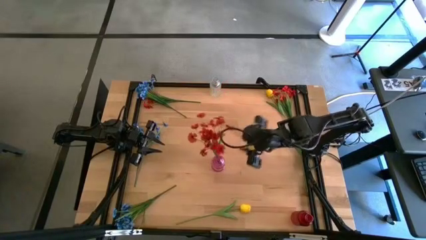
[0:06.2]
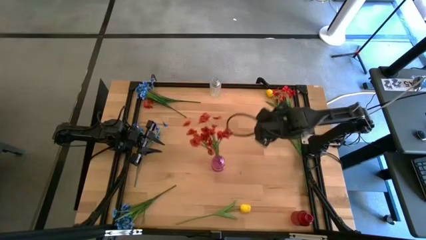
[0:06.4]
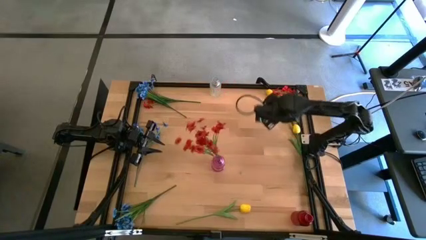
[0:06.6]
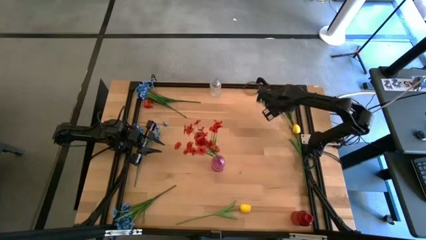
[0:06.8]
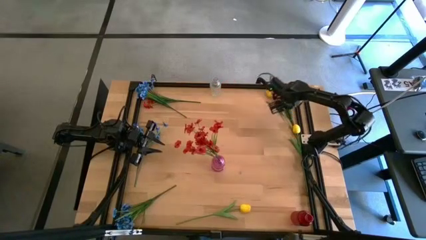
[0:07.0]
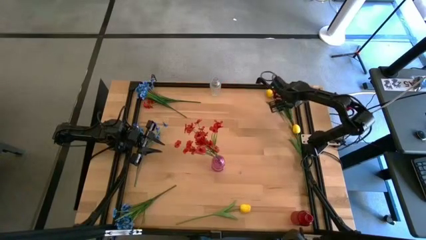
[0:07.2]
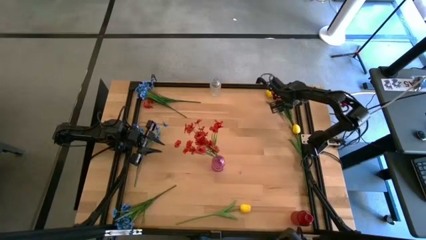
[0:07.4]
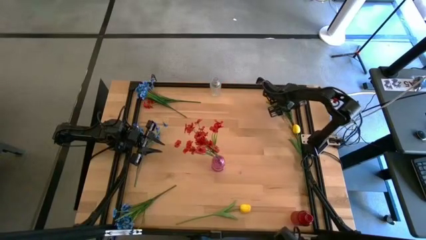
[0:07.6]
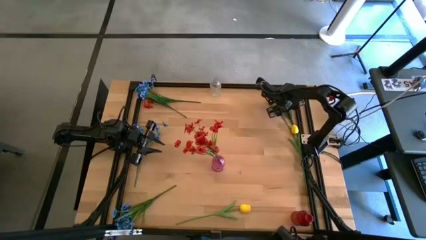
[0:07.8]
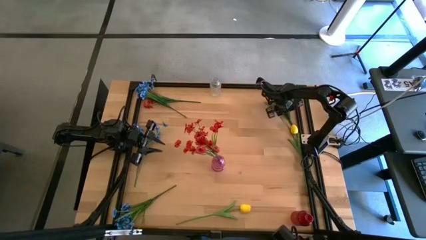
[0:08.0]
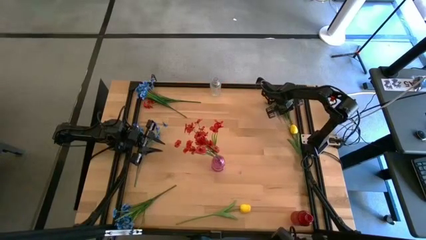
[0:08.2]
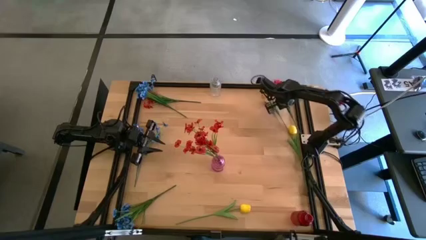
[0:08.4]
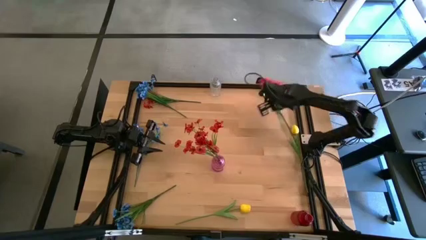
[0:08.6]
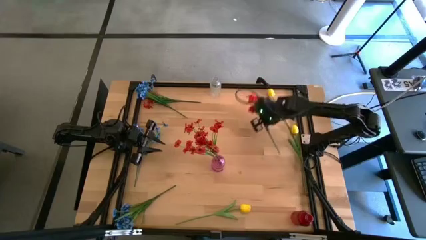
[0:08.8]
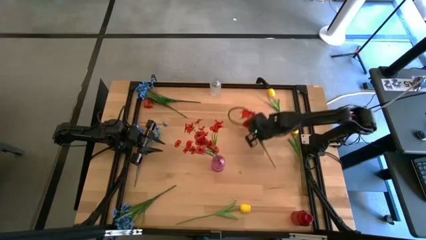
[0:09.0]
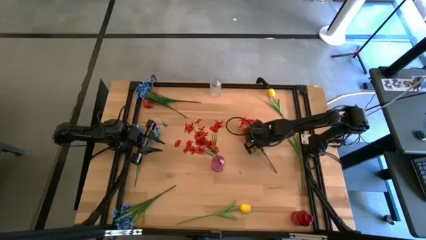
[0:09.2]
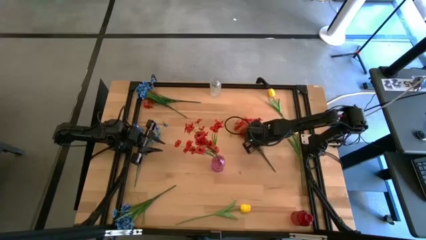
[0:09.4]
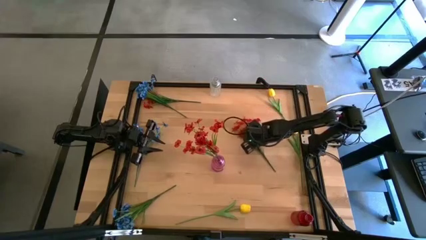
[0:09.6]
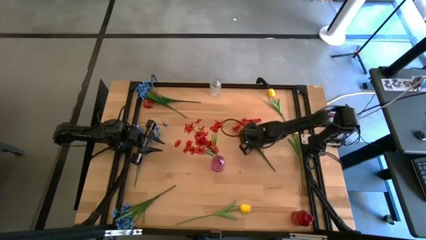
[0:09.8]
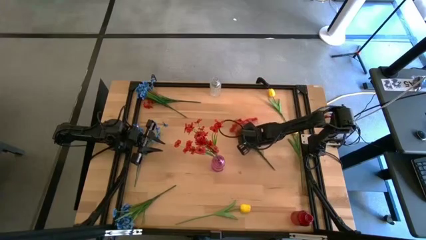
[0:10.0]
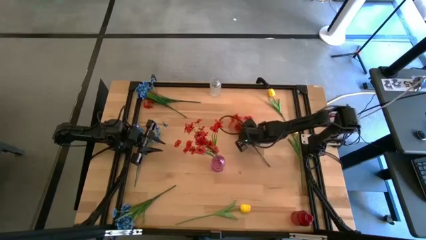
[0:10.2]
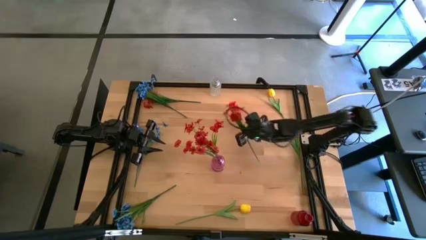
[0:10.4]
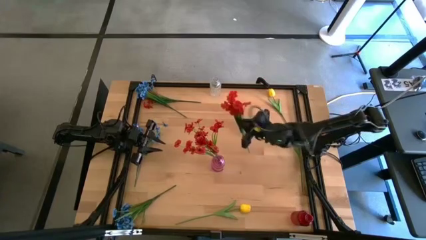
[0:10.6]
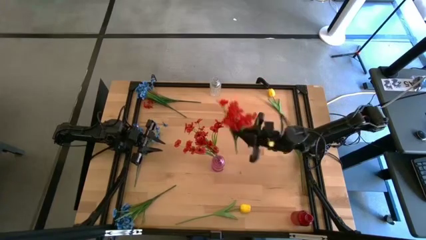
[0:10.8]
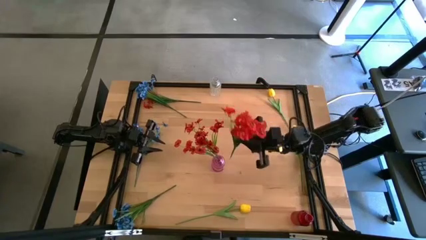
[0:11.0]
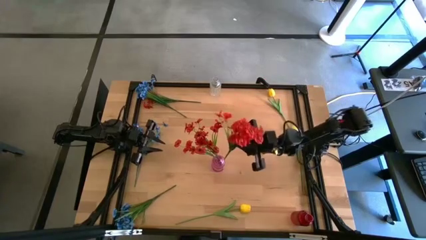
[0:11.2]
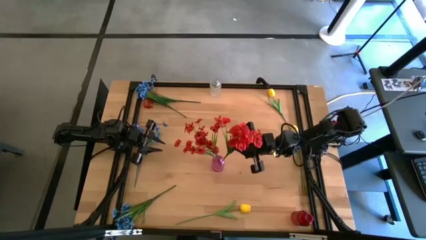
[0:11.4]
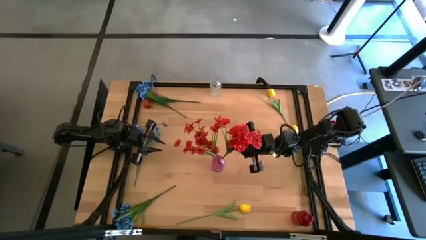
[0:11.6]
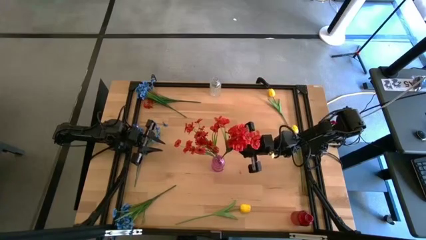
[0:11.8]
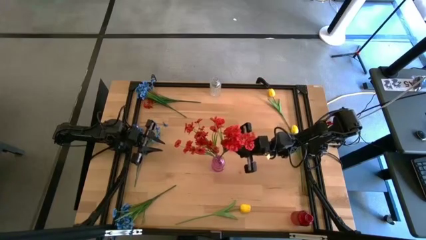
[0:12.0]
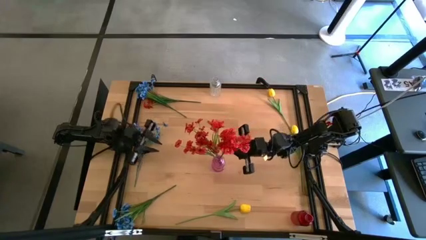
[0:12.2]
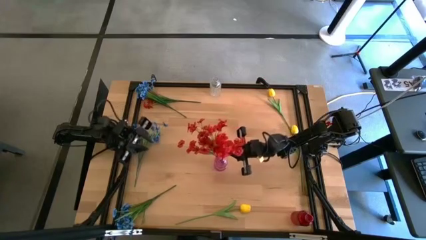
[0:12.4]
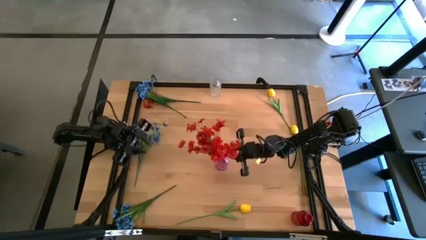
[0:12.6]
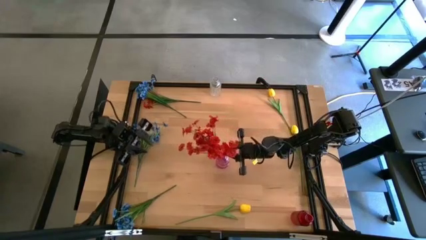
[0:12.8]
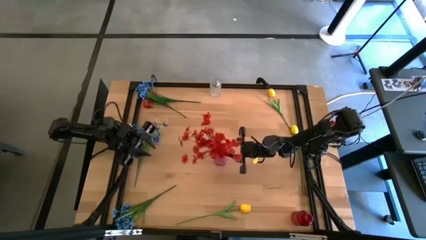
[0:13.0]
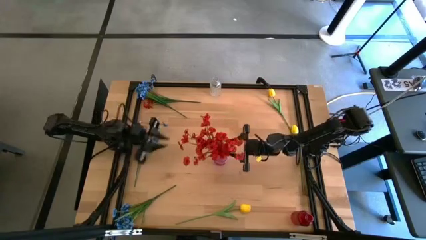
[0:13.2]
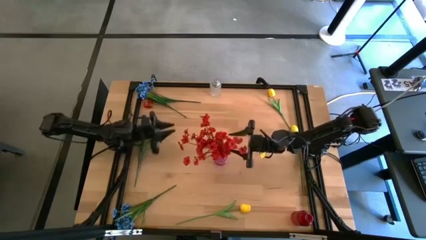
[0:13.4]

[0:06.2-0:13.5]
Task: Sort flowers into vase by color
Put the right red flowers into the purple vase

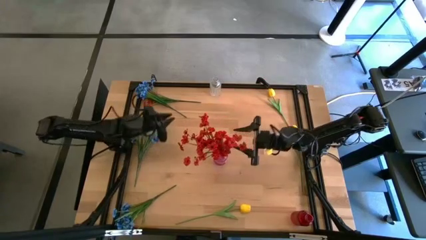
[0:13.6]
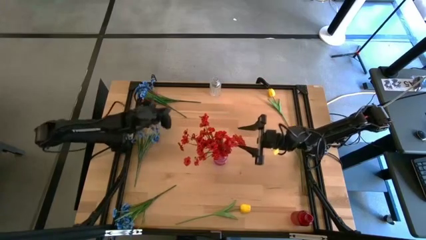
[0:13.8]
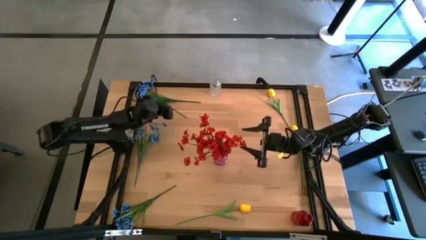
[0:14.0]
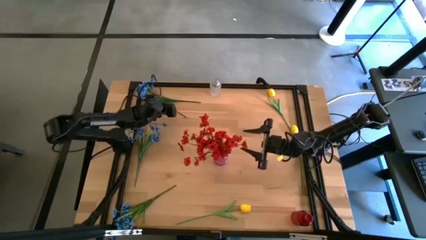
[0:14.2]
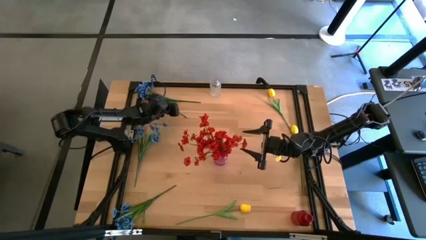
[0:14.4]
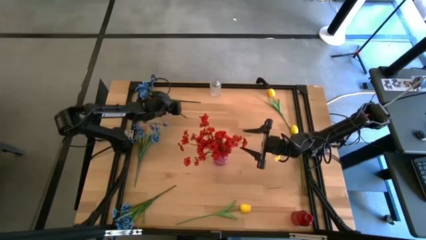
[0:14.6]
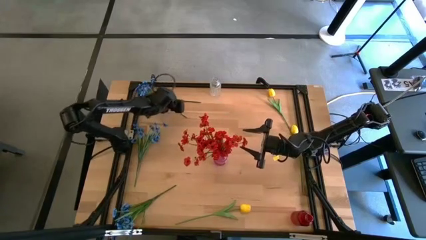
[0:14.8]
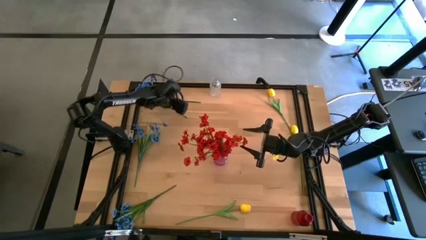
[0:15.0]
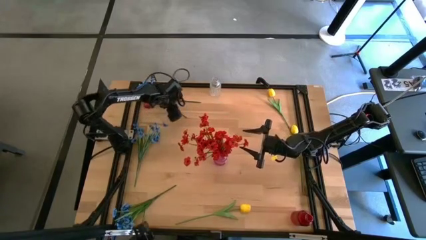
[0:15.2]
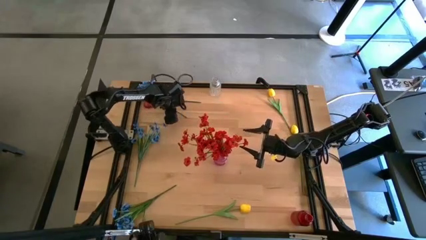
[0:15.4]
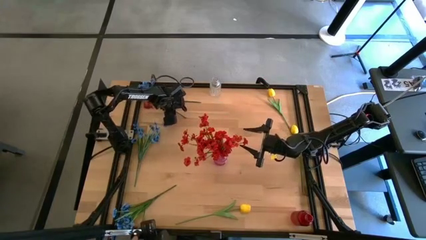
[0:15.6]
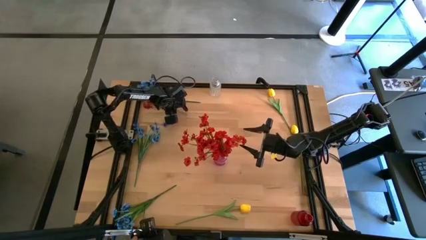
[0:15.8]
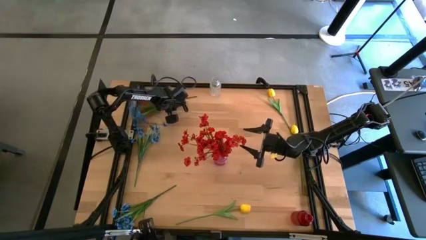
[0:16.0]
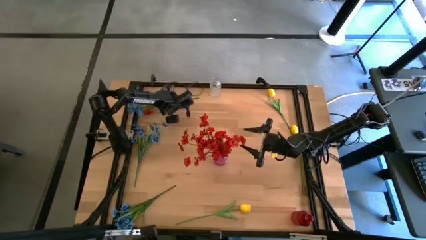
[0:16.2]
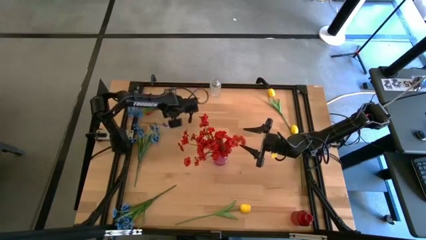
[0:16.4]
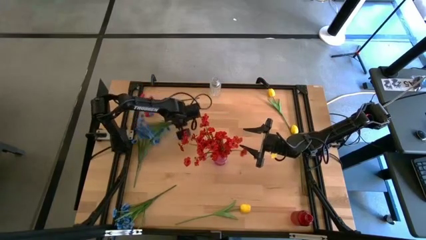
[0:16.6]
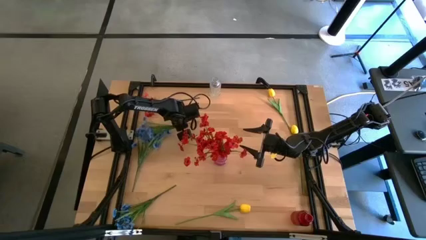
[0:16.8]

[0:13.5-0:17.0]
Adjust the top blue flowers

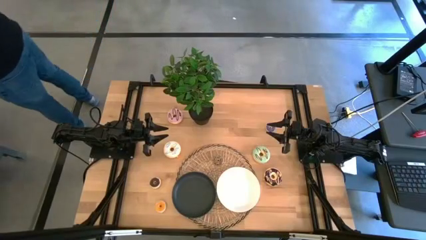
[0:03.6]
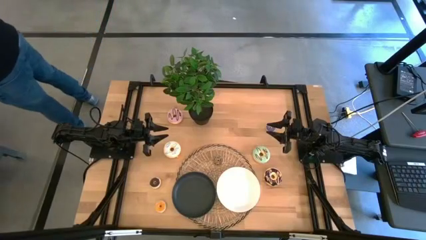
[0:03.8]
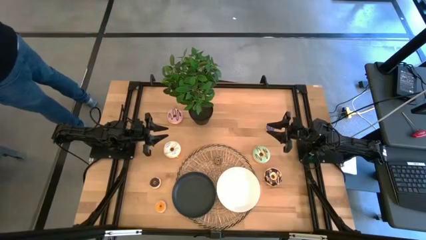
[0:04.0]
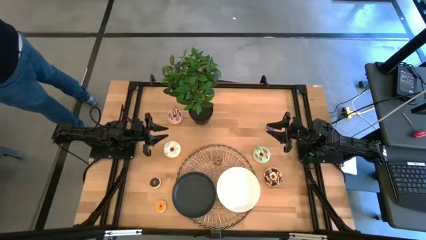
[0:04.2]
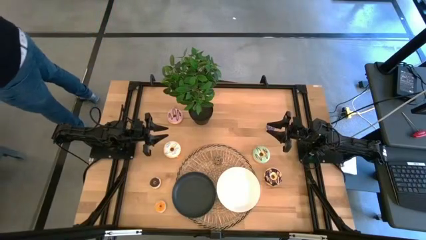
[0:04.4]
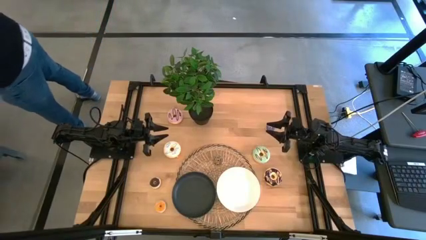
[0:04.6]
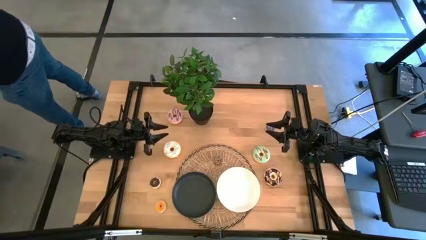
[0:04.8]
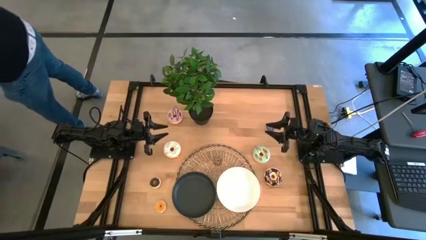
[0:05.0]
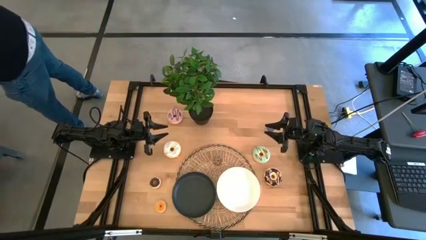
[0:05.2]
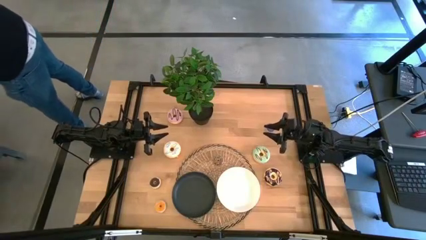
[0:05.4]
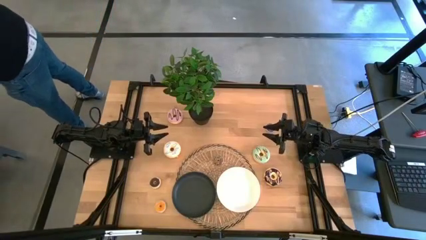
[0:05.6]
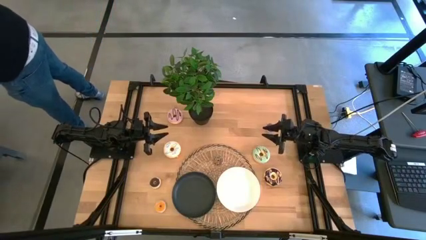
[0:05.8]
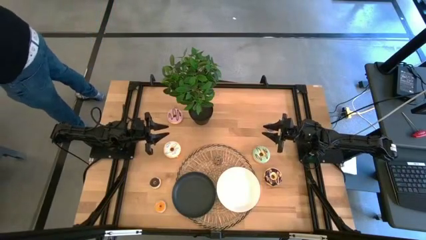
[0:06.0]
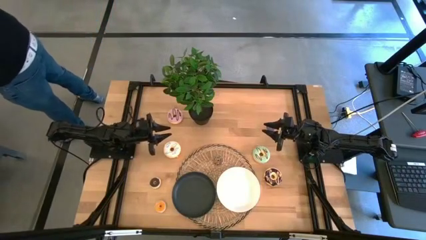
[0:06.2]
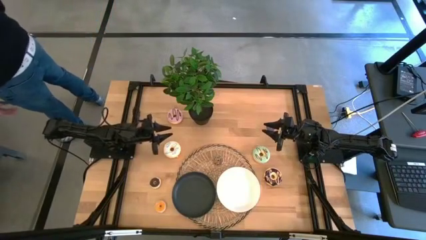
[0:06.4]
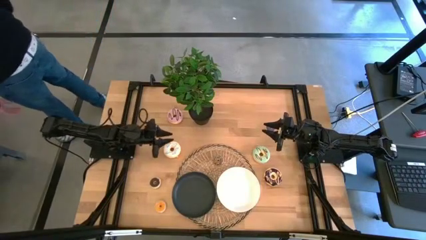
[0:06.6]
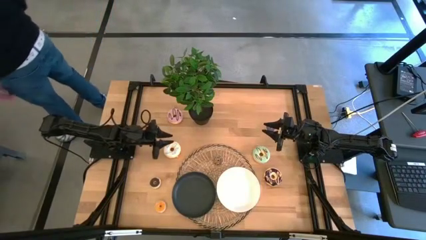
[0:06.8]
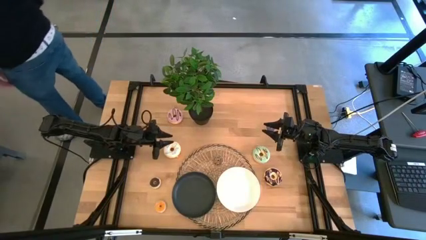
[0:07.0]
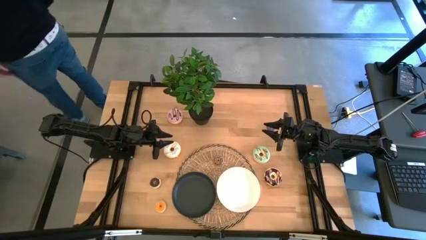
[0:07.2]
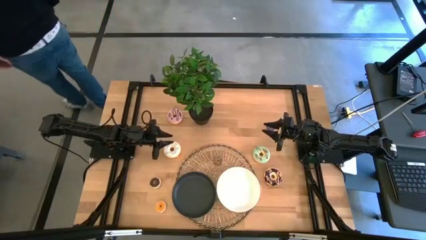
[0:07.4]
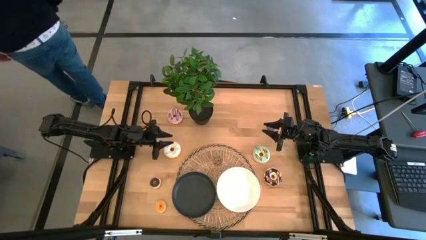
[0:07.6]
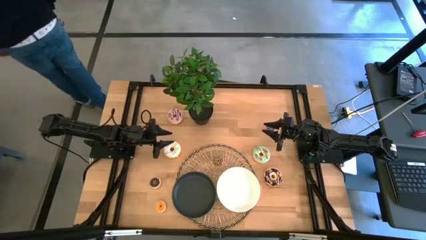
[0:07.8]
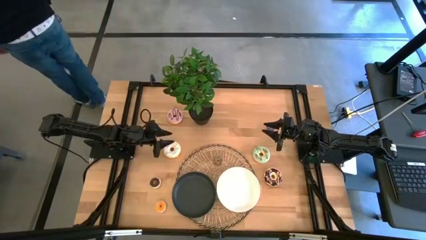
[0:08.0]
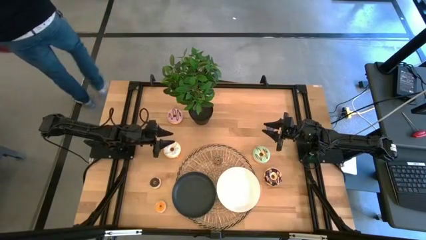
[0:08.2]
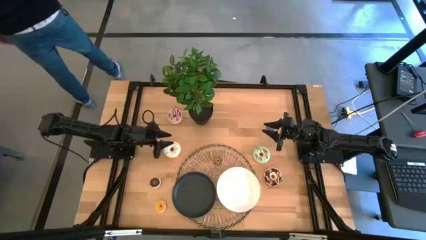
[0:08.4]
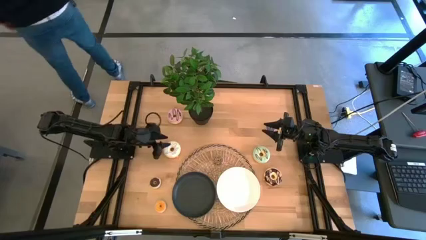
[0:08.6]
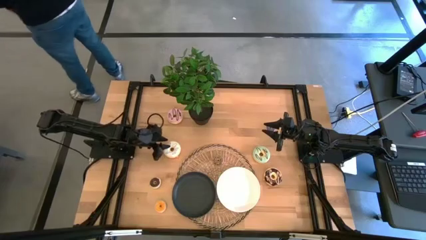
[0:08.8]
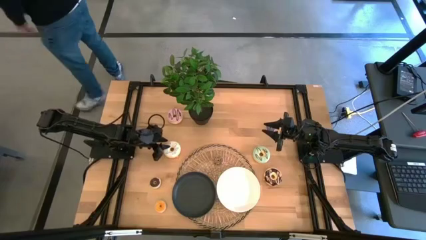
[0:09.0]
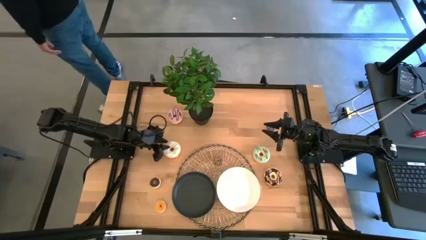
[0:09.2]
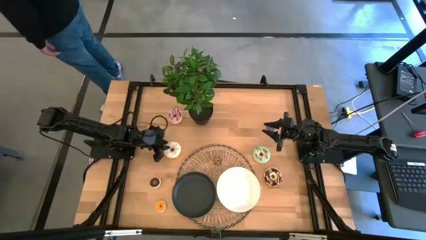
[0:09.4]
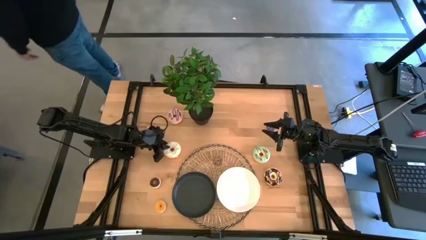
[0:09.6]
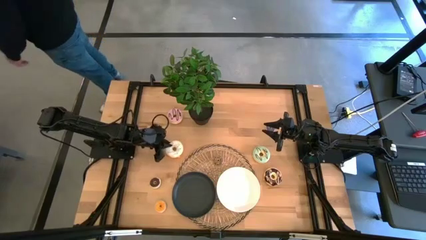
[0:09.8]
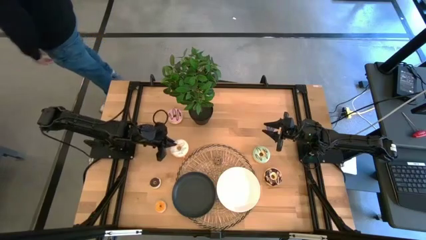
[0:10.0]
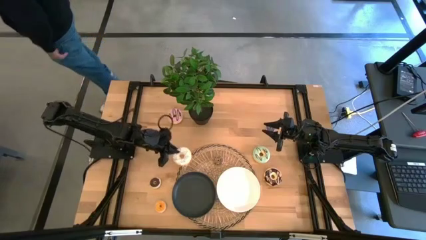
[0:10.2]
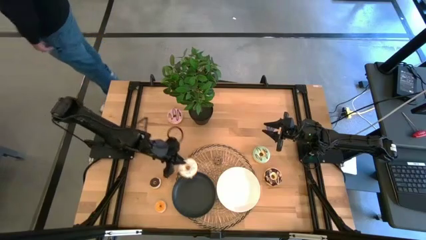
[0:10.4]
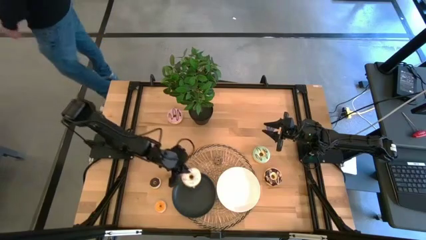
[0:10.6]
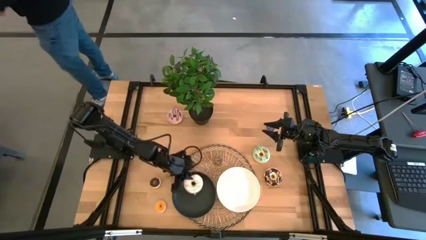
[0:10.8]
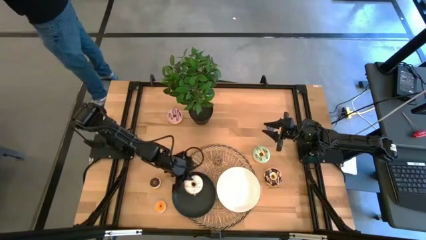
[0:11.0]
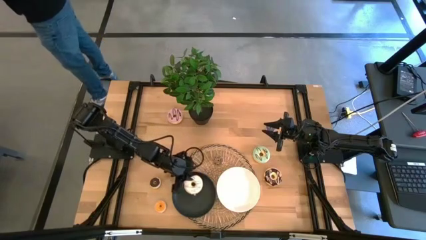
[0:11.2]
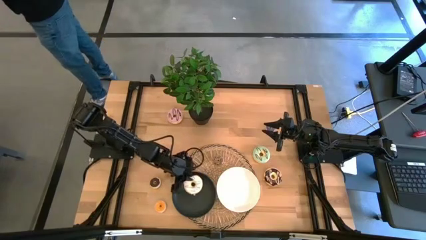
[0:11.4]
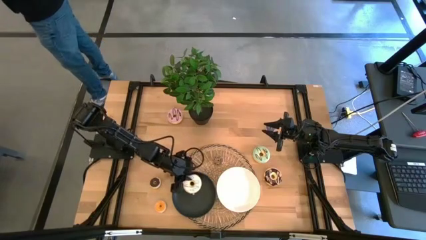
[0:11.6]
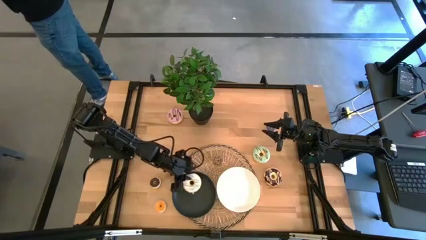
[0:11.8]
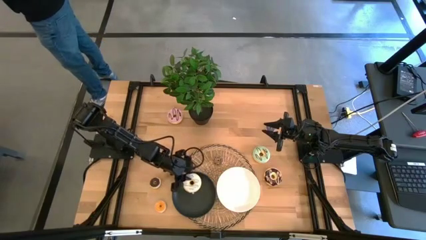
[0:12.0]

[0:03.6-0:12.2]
Task: Pick & Place donuts
Put the large white donut on the black plate
